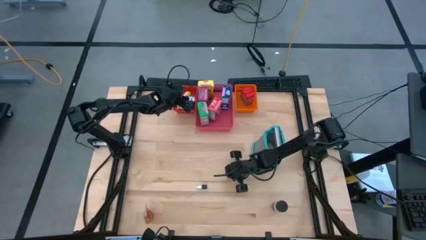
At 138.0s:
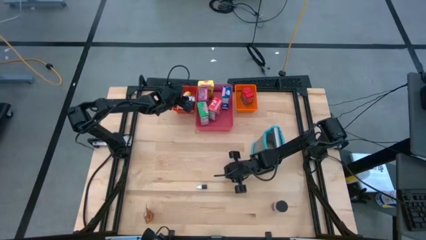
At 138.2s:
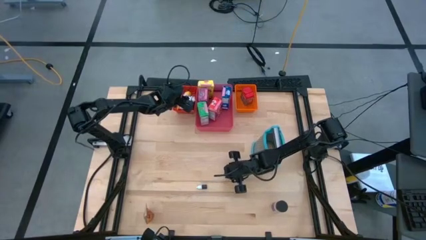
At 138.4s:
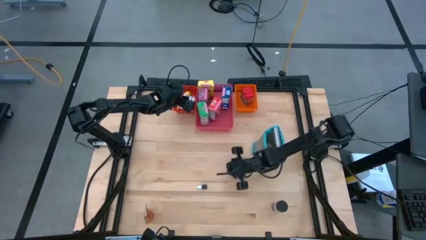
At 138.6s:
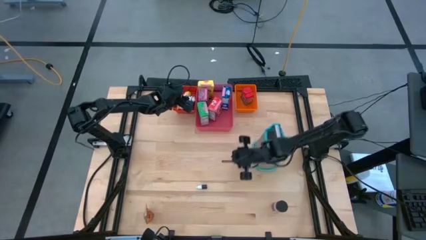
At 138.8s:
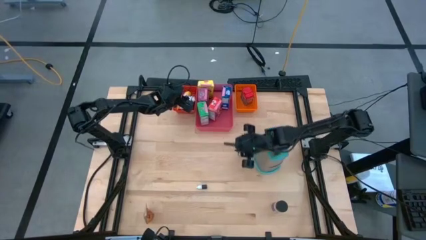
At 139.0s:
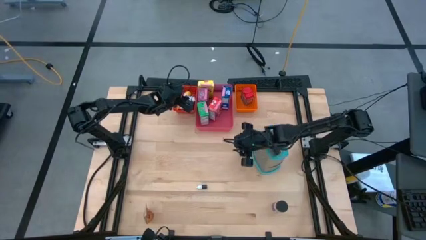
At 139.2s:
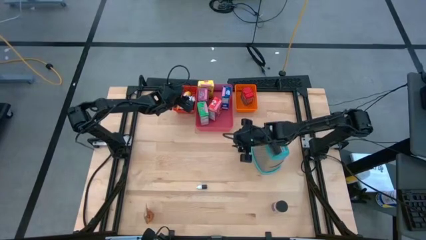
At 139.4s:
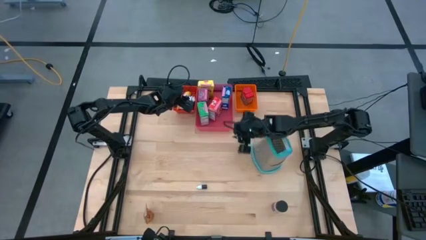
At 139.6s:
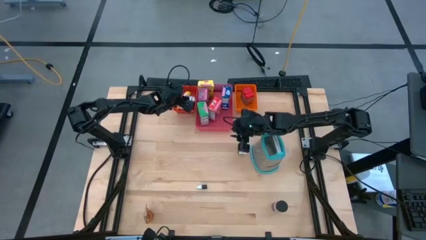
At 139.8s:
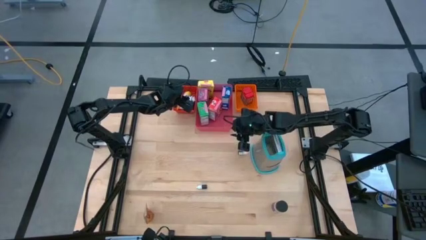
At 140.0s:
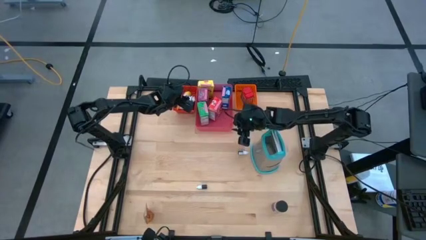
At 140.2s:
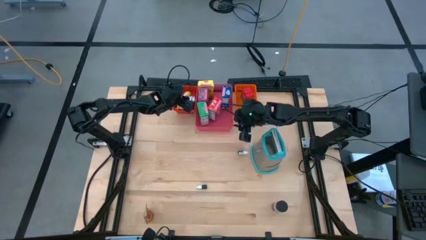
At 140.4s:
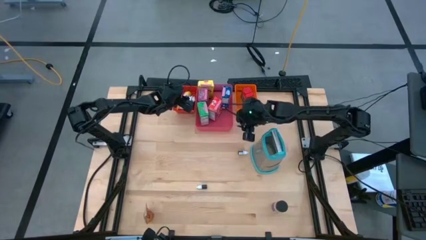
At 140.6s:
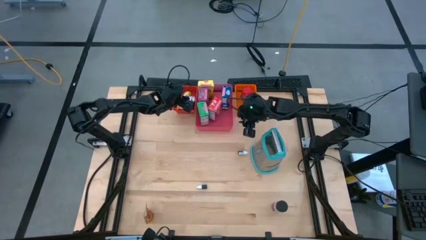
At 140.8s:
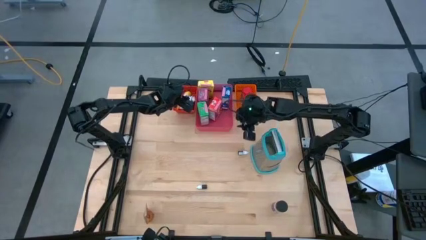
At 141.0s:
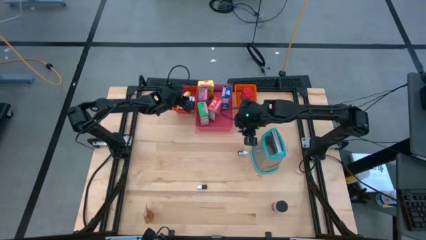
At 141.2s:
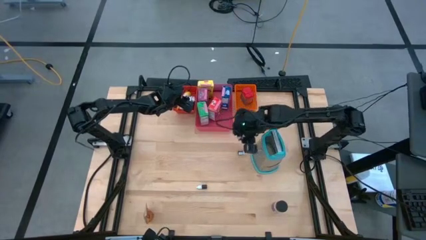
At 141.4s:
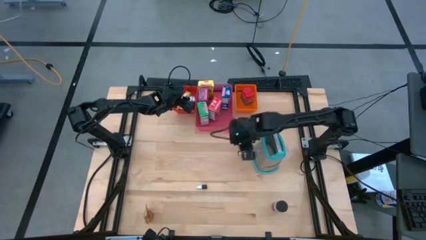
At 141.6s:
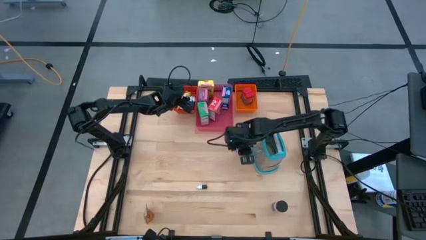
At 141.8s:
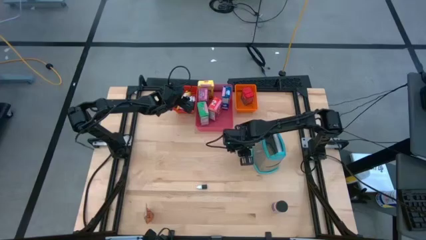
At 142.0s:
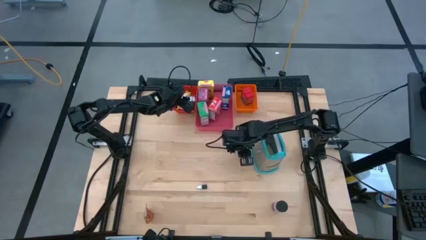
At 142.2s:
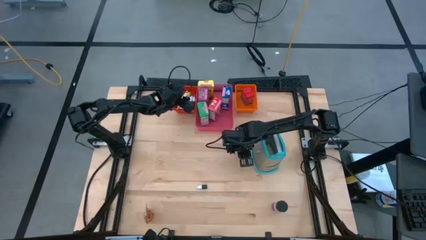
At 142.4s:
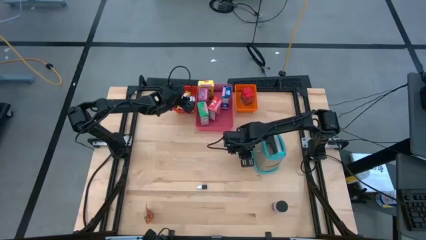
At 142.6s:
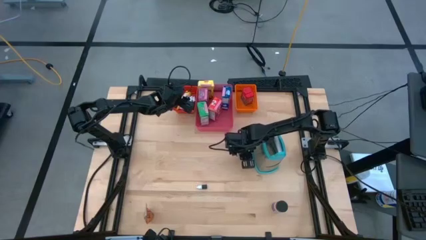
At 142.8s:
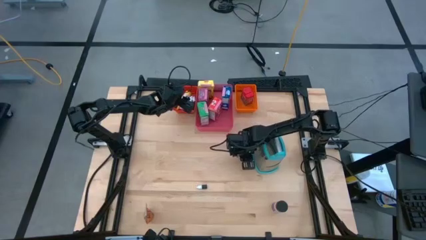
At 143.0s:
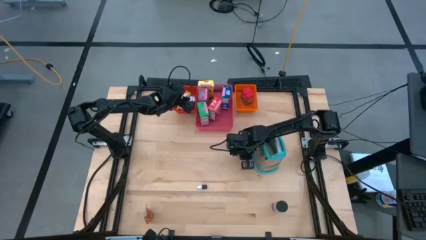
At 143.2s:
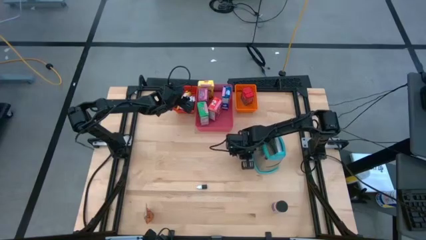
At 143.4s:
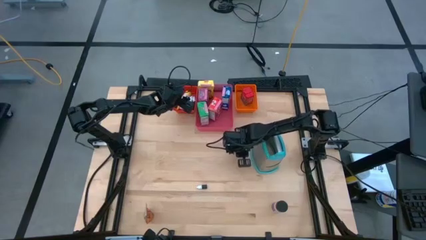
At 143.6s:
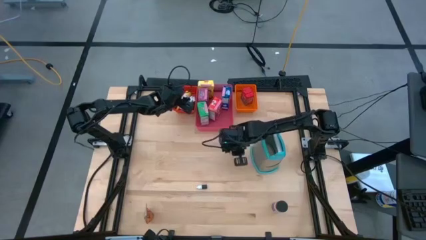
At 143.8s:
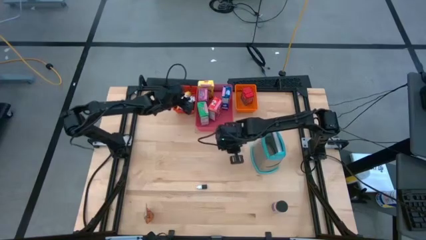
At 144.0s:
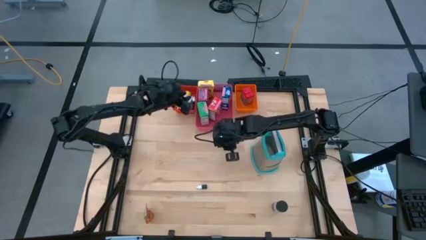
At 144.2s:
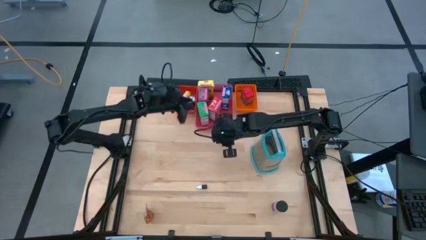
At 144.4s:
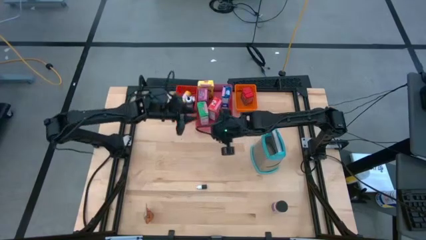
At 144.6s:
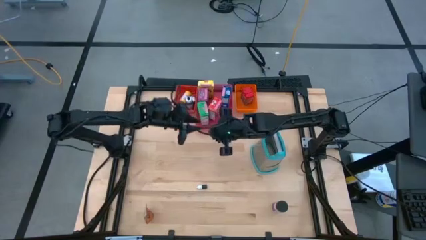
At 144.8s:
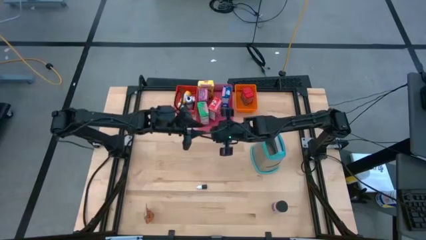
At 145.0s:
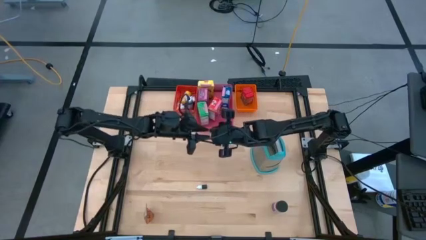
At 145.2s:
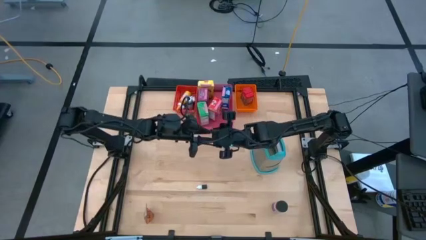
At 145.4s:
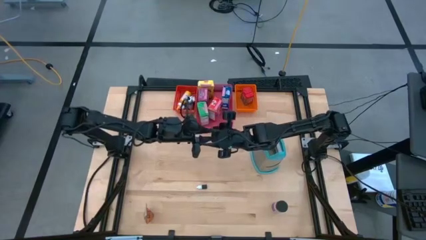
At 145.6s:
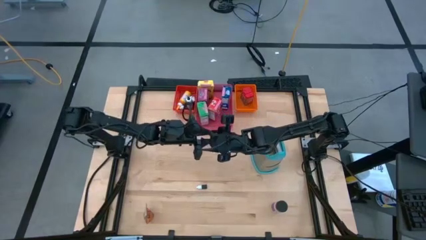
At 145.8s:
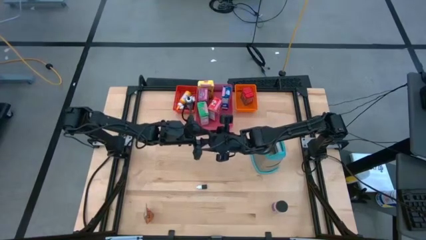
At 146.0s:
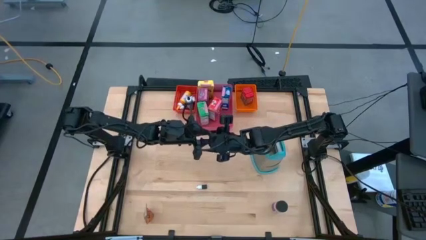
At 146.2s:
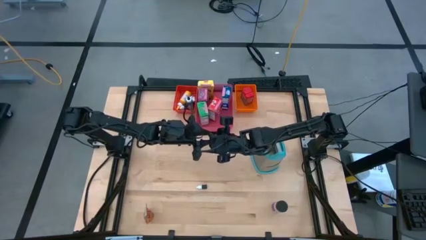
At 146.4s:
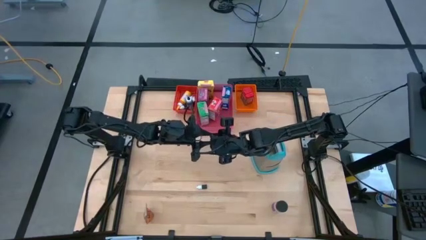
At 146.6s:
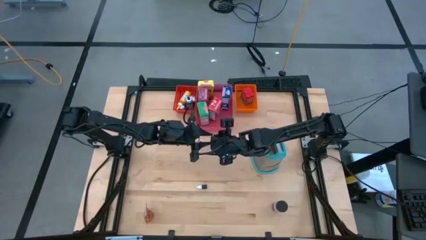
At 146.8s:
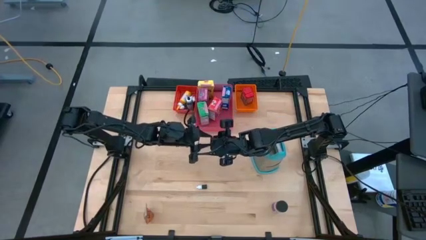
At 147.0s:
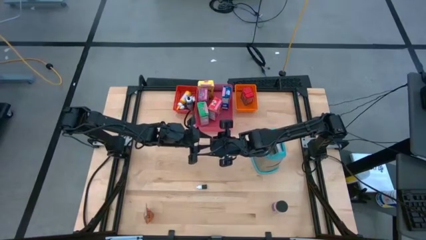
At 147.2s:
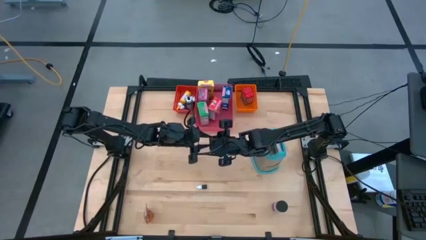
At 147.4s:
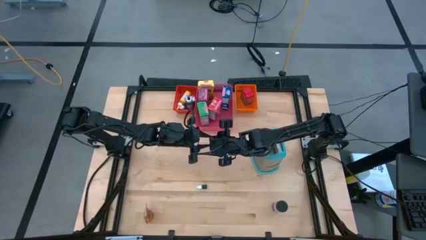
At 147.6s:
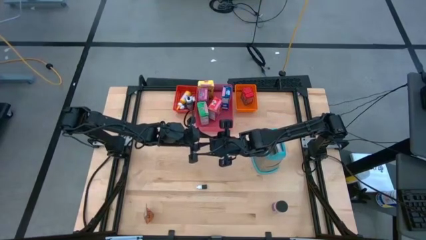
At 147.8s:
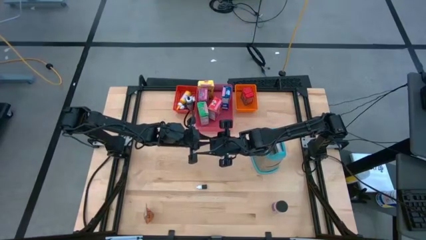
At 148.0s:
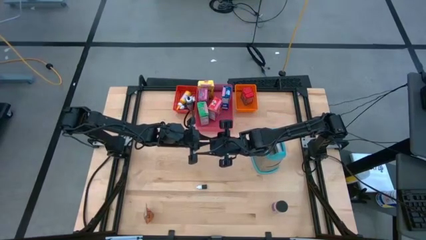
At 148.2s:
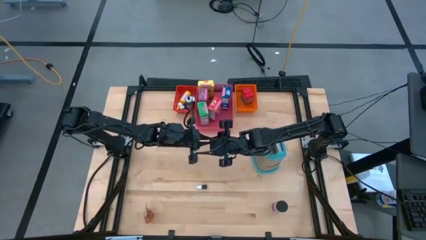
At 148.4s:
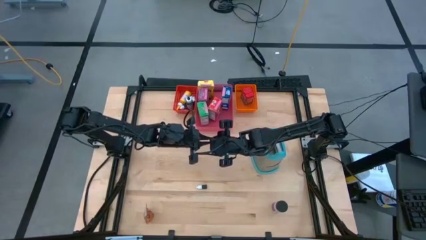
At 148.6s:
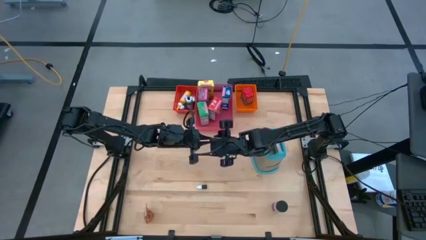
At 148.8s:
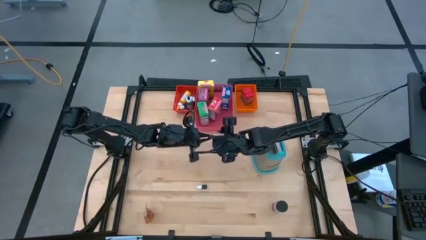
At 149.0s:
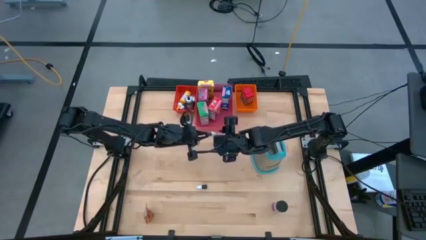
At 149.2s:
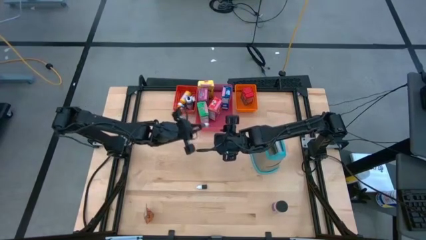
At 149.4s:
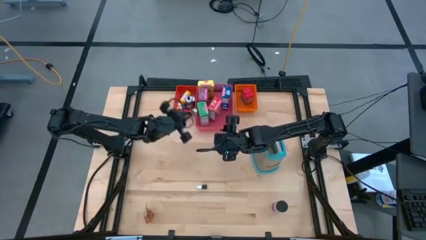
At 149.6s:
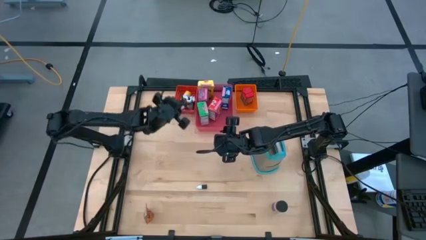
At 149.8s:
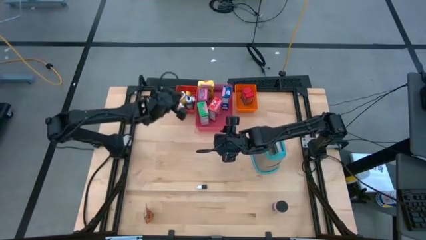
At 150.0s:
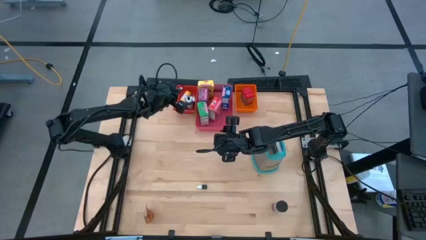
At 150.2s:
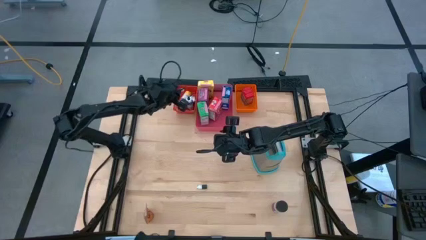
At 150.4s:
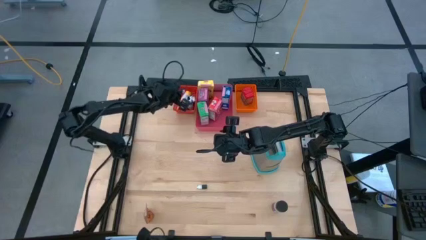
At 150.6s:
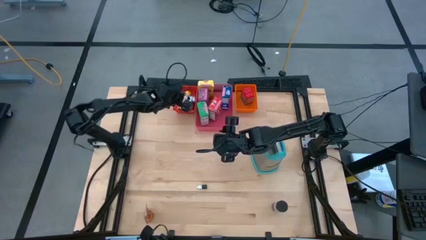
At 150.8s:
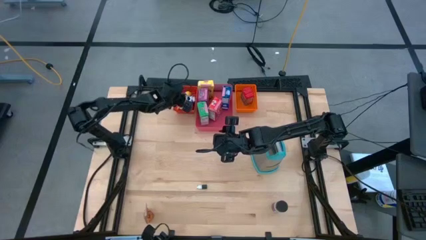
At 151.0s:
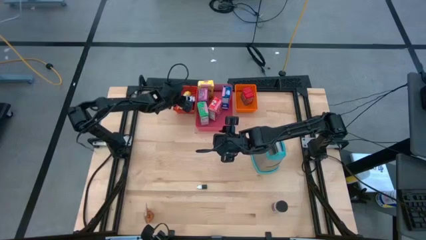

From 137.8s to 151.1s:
Task: Pick & Place Kitchen Items
Put the small black food coloring bottle into the red bin
